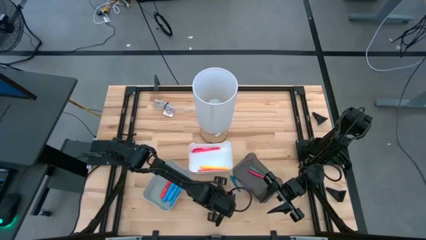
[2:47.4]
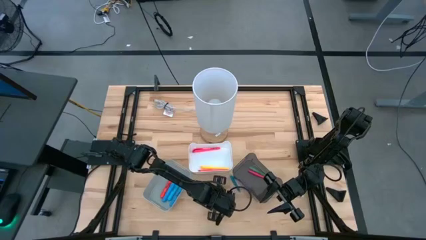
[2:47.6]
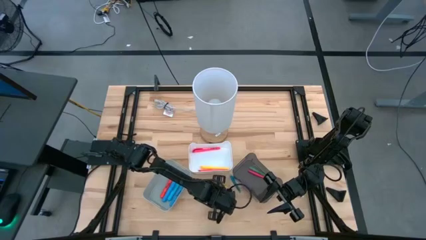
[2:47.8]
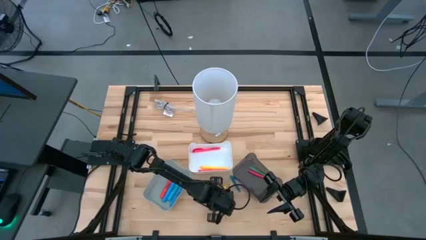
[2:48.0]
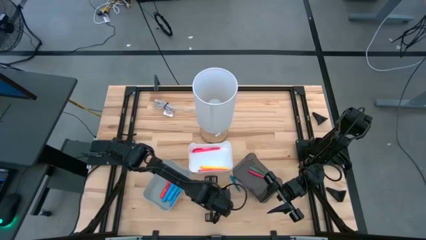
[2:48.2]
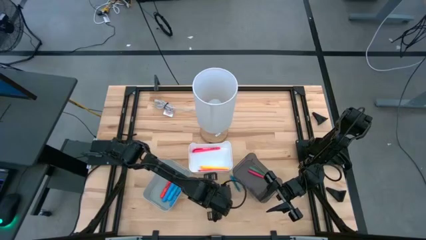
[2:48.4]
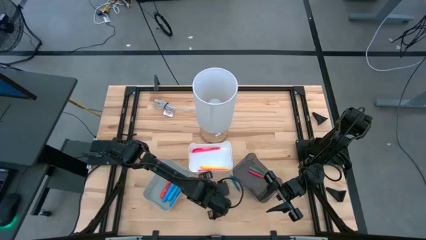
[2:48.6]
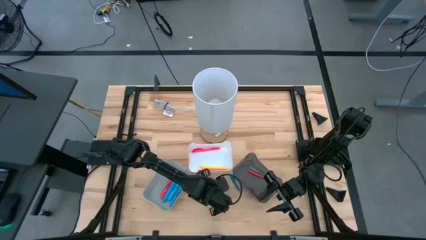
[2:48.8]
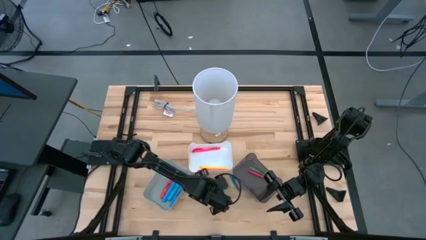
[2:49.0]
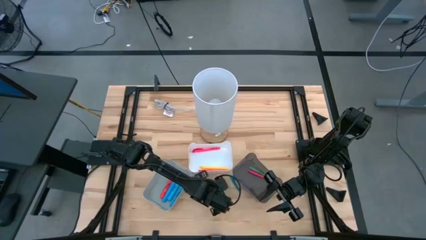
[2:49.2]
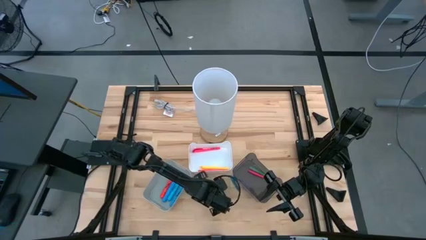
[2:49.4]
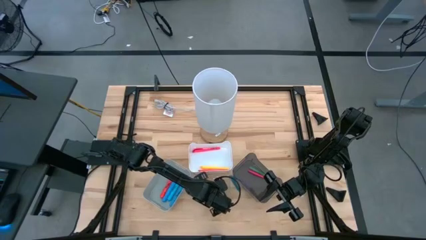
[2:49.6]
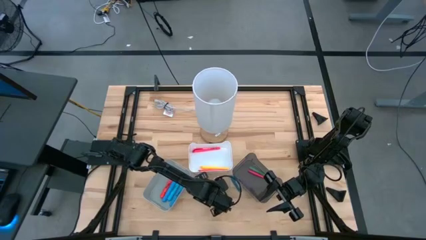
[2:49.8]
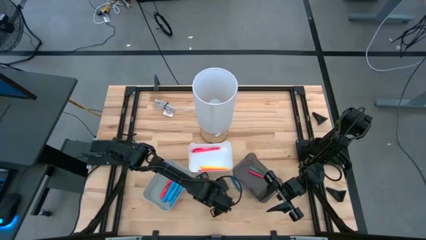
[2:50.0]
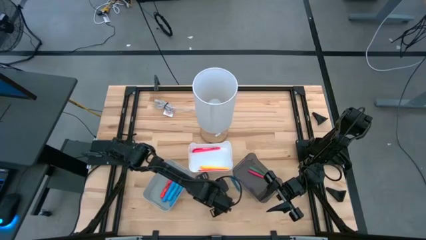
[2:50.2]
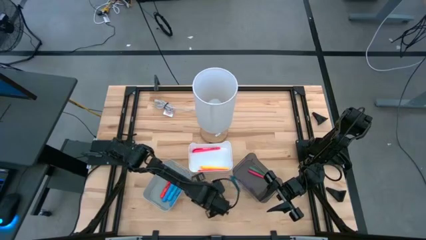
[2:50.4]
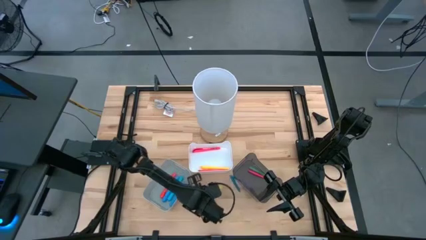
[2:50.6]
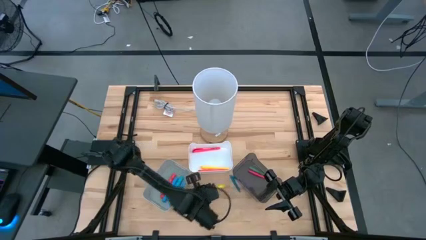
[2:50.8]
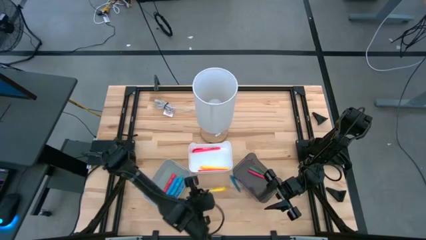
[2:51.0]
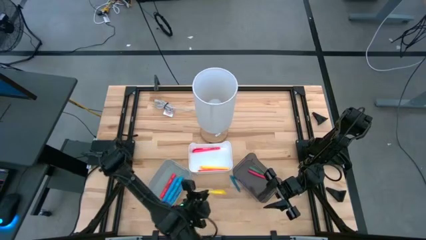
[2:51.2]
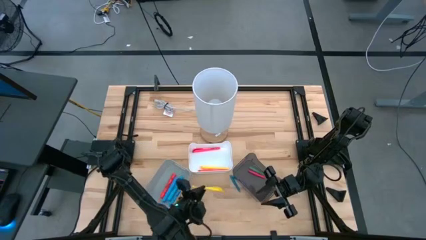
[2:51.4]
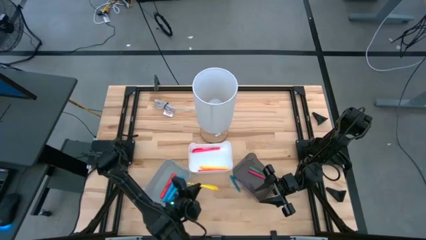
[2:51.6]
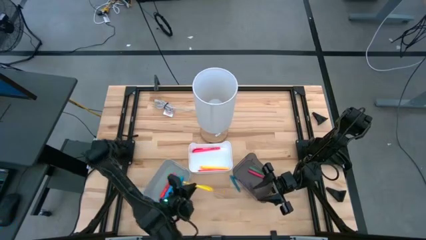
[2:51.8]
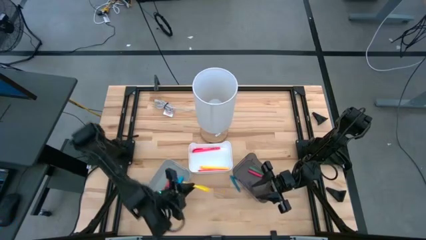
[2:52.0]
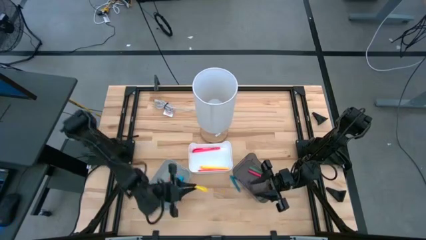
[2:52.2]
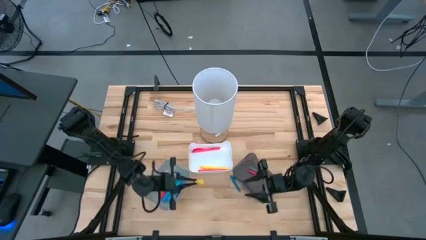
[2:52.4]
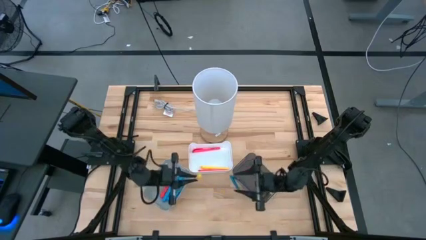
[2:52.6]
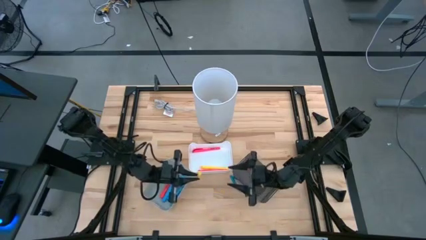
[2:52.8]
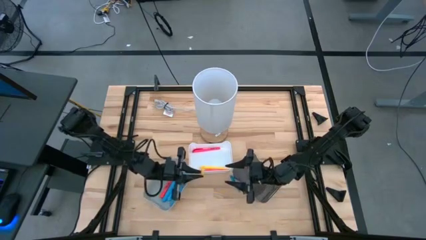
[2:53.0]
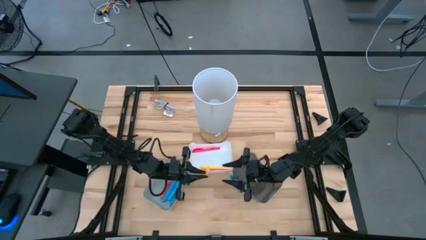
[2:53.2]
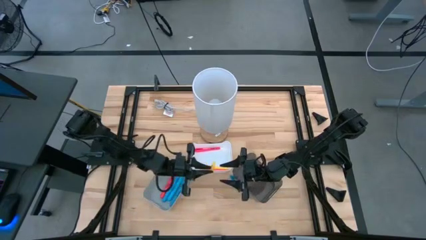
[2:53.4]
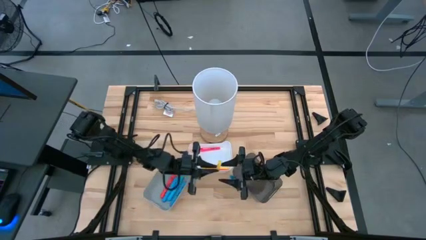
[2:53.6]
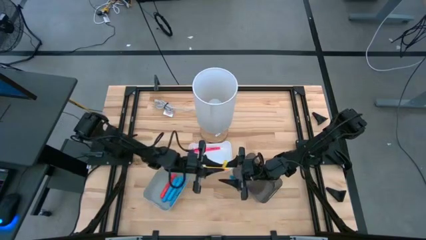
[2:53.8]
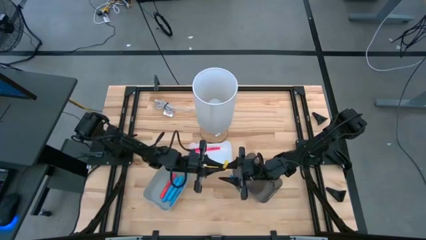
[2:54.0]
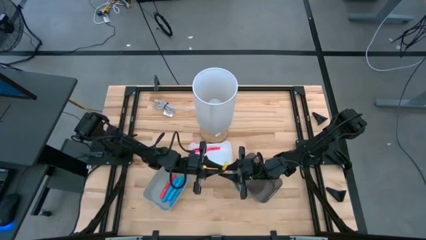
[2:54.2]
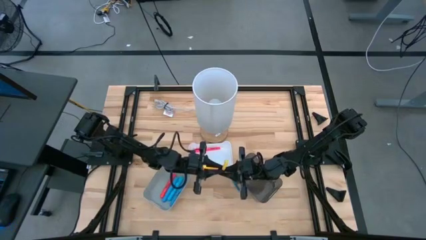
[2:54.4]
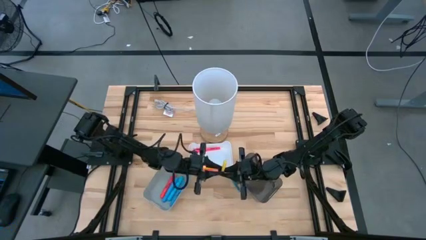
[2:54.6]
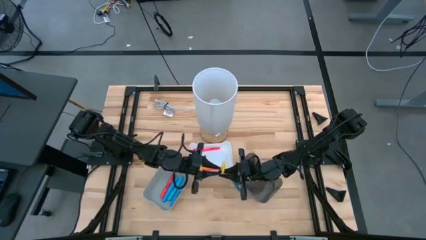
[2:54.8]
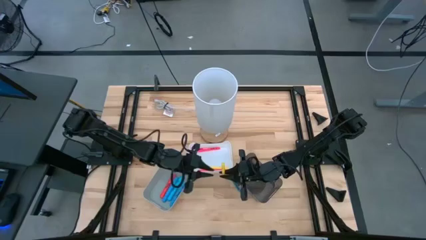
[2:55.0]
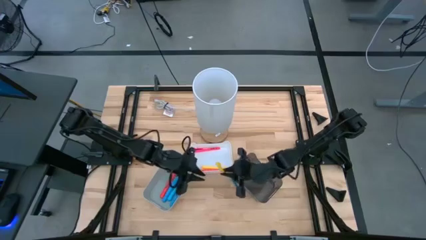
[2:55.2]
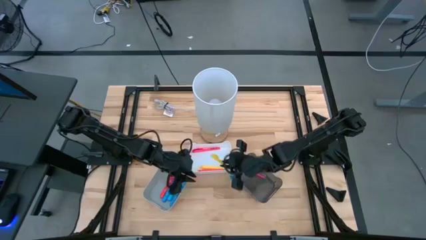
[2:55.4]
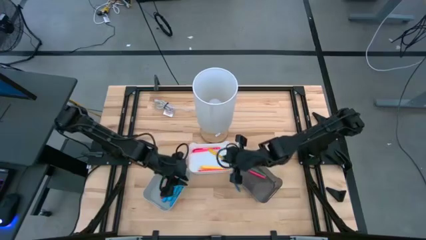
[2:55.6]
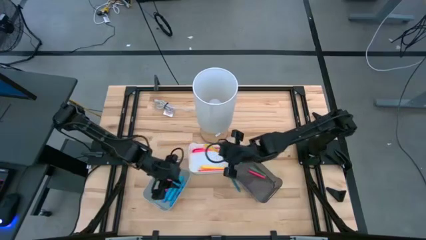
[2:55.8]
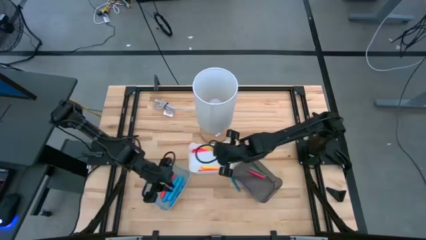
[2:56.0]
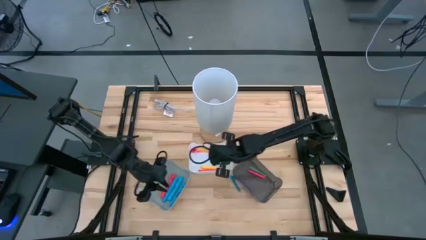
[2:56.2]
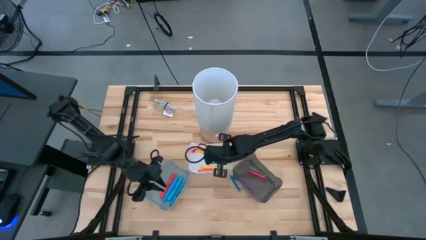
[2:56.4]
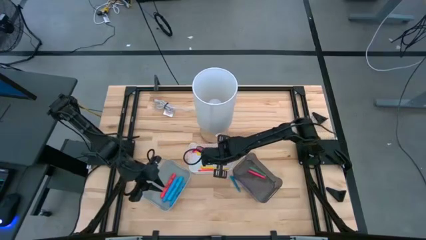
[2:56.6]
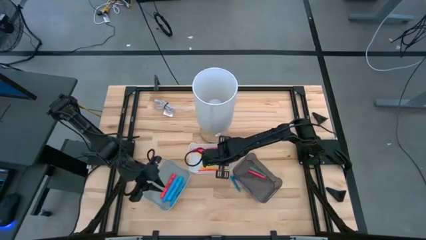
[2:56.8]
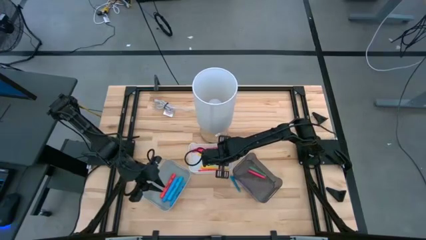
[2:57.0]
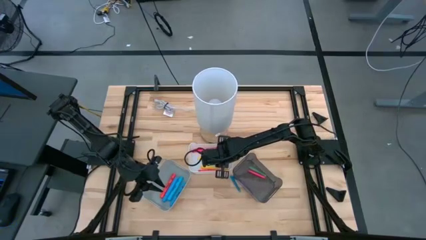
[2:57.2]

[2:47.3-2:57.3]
Task: Pick & Place Markers
Put the yellow marker pen in the white bin

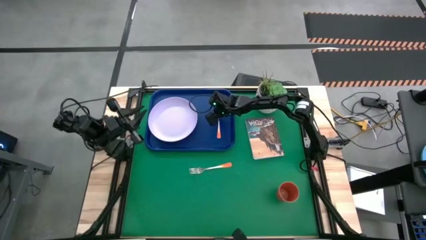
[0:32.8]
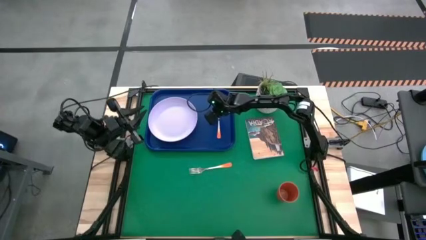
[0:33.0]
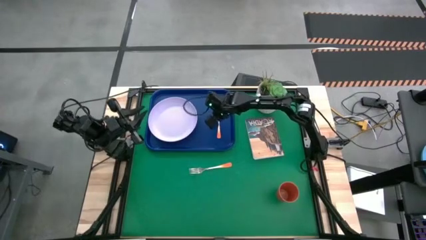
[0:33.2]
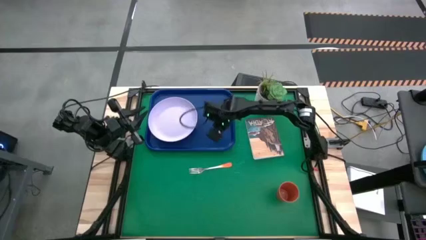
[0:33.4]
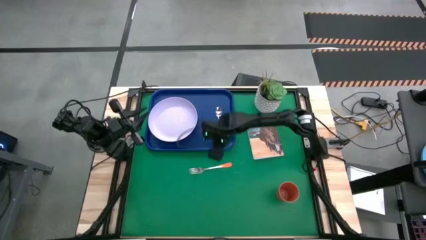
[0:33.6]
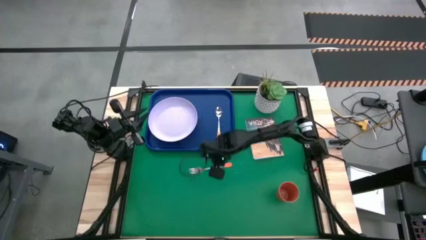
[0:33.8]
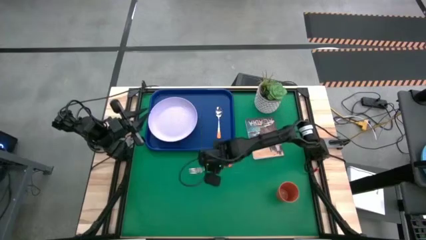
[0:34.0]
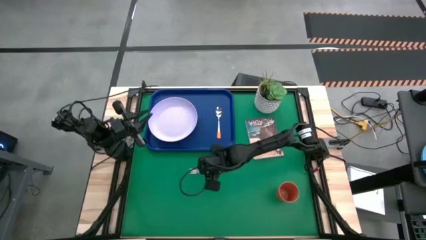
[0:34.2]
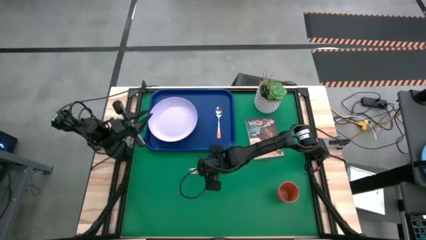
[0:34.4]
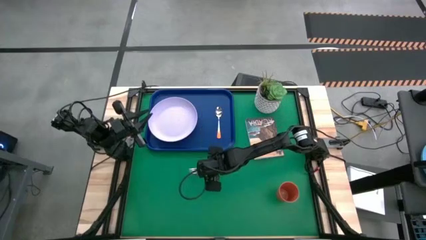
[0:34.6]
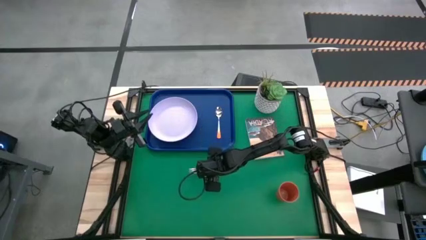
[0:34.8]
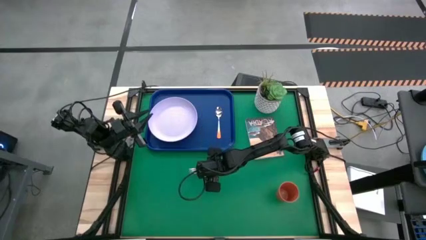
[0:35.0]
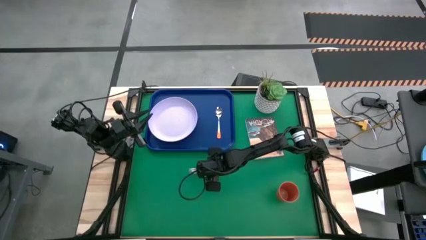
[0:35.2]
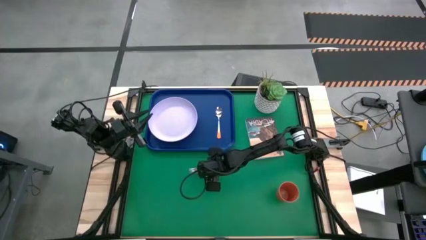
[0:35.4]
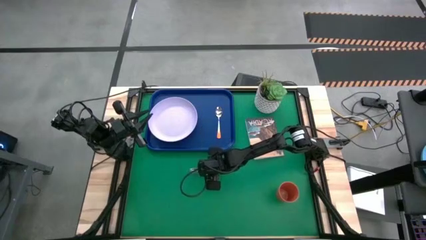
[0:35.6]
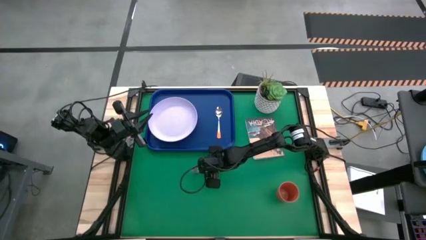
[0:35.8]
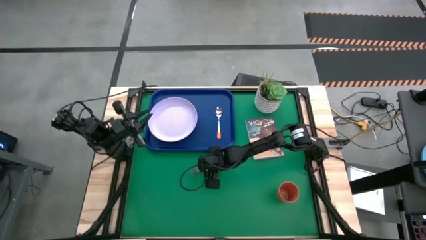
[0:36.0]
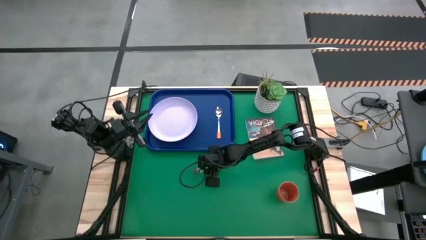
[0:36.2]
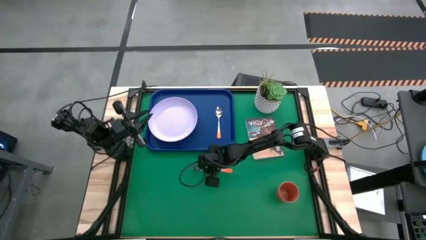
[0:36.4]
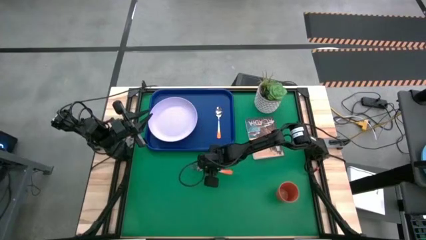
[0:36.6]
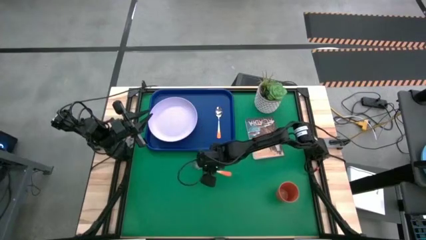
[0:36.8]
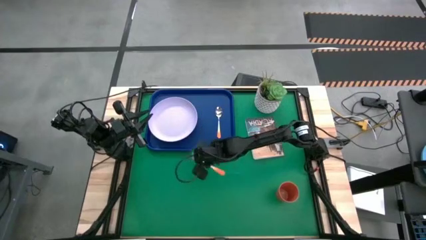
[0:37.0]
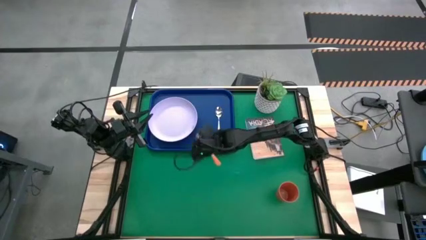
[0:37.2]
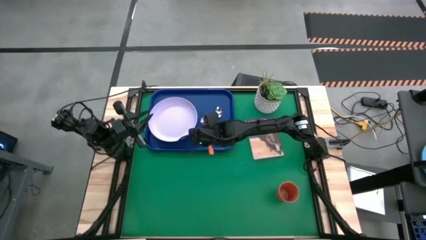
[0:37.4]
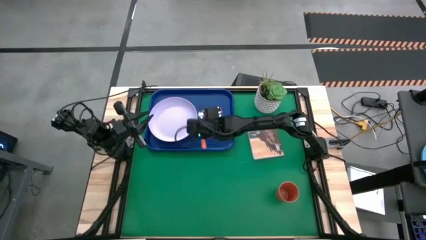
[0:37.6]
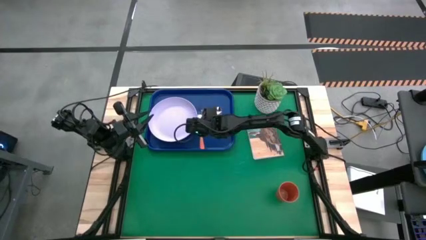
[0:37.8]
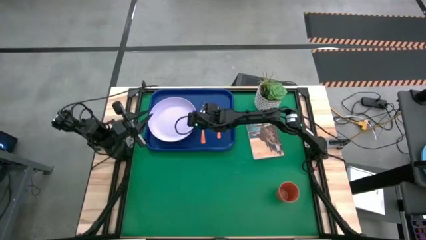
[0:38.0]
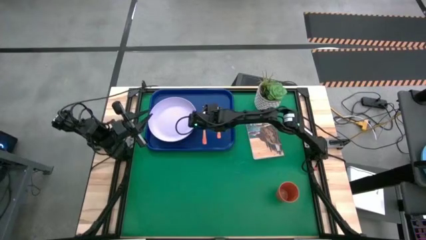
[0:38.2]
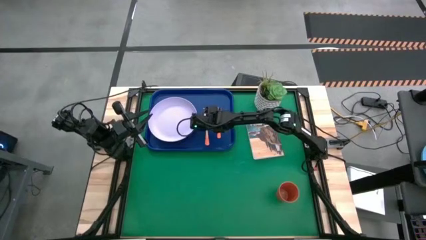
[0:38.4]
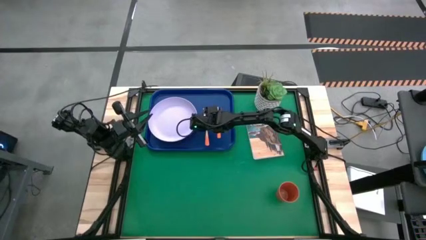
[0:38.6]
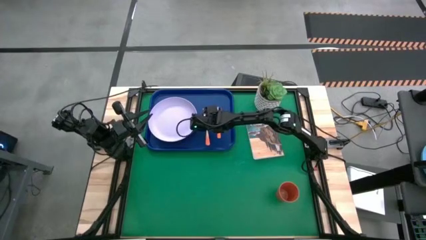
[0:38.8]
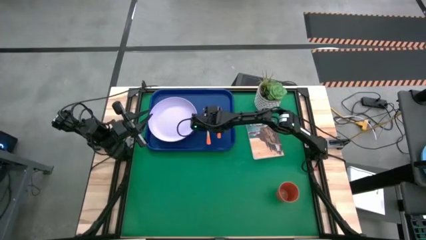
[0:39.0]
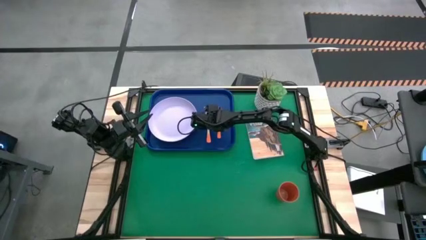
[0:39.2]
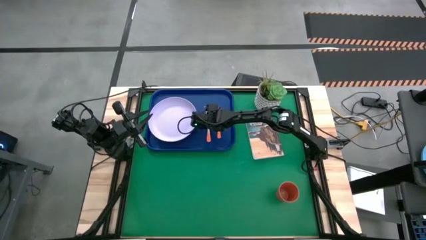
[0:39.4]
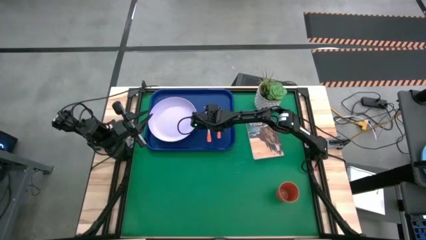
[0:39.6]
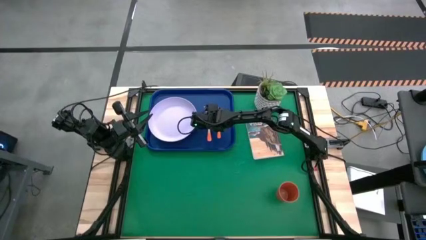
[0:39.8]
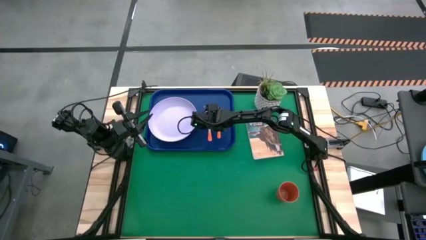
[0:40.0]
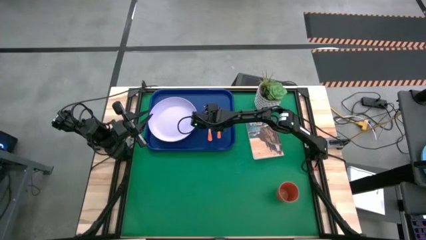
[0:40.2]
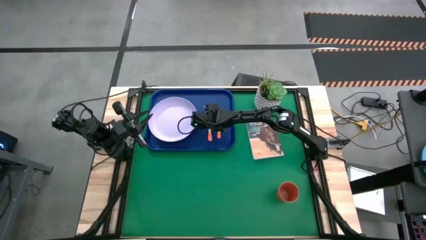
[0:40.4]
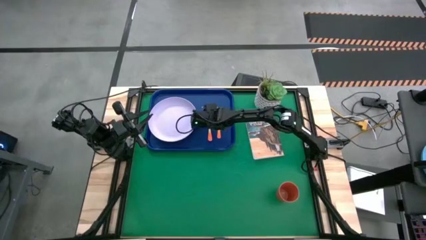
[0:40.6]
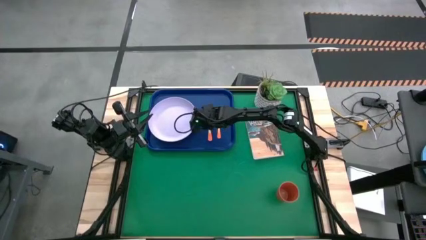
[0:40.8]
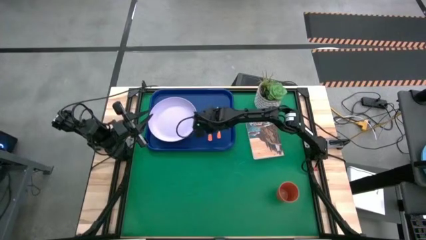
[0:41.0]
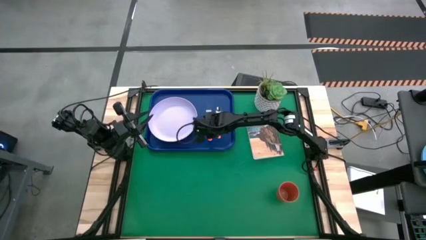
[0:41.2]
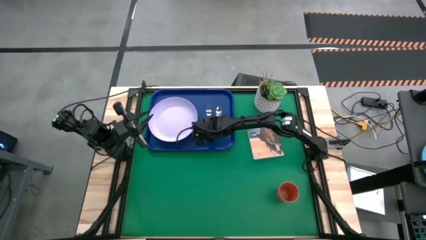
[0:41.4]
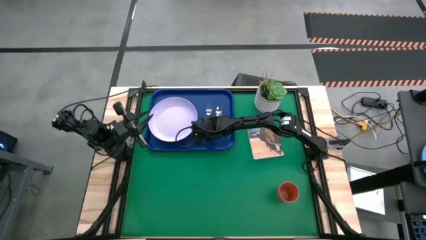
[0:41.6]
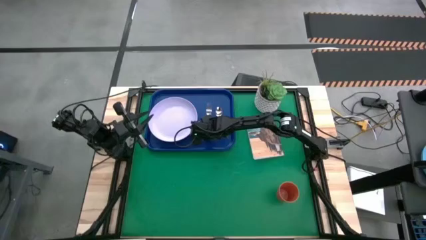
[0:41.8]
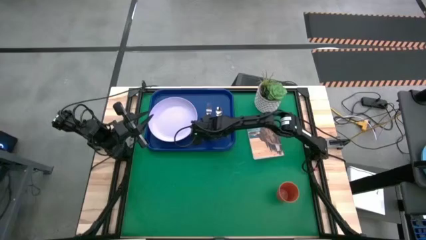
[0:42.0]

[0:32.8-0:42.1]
Task: Pick and place plate/cup/fork/spoon on tray
Put the orange fork on the blue serving tray
